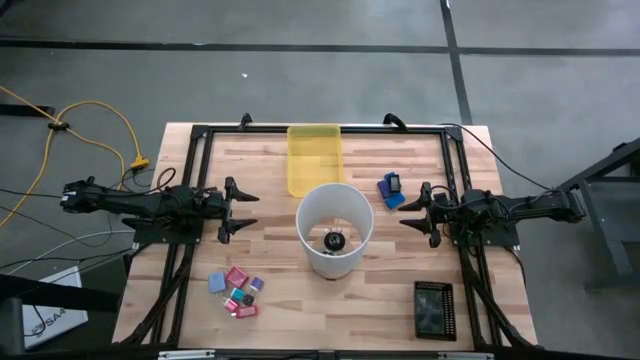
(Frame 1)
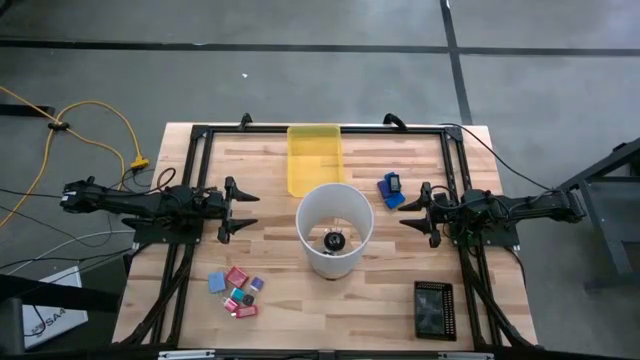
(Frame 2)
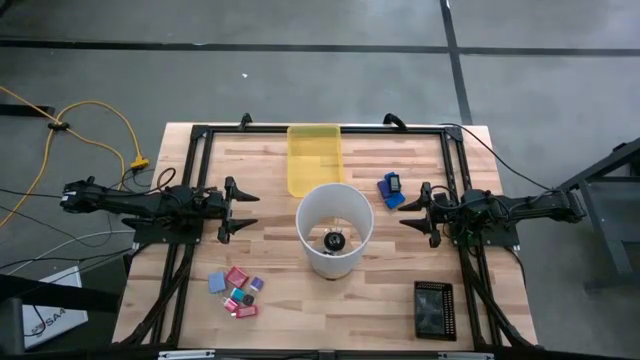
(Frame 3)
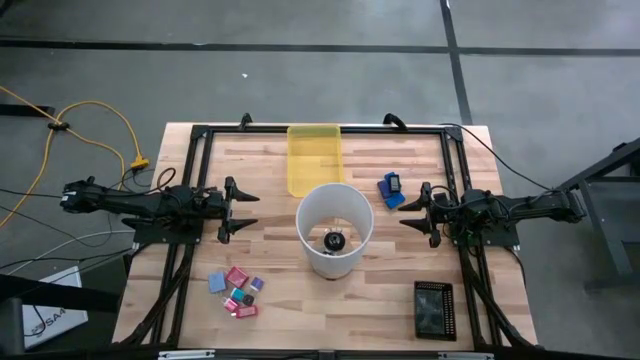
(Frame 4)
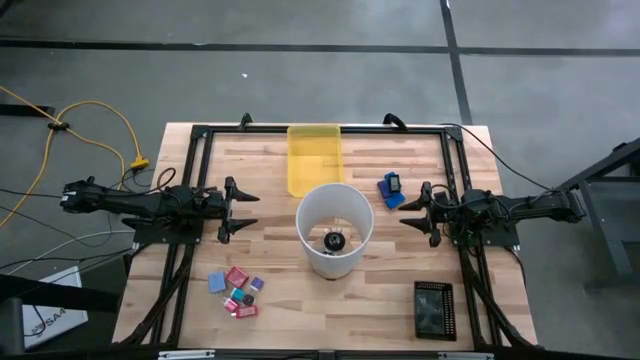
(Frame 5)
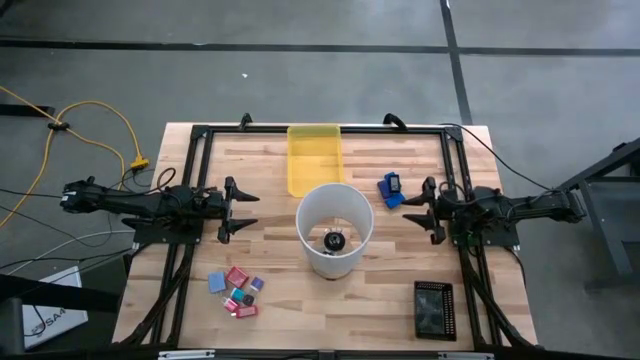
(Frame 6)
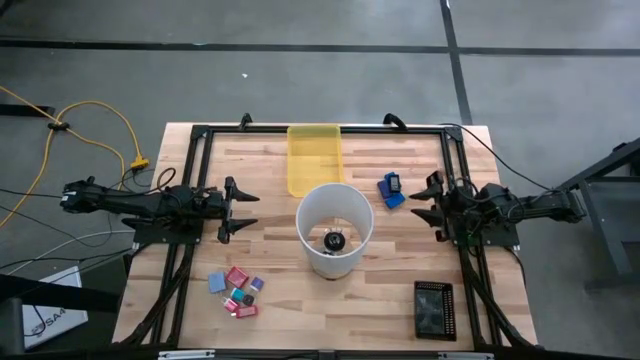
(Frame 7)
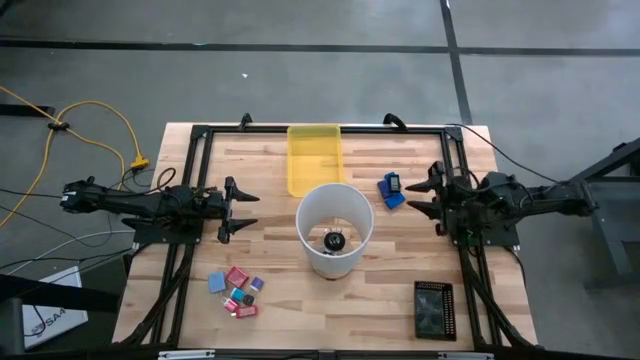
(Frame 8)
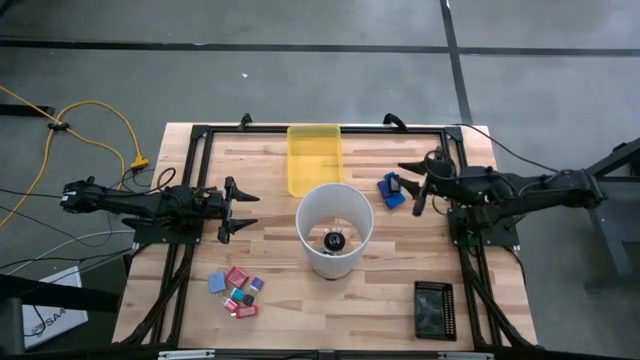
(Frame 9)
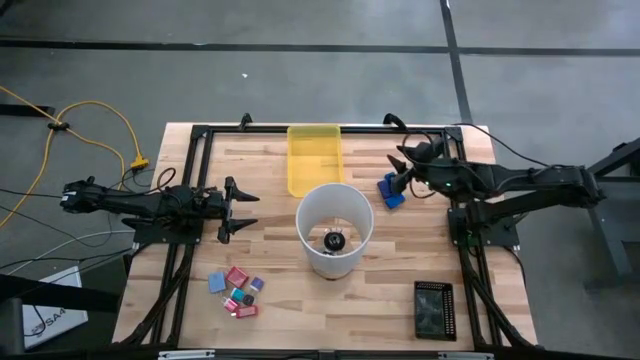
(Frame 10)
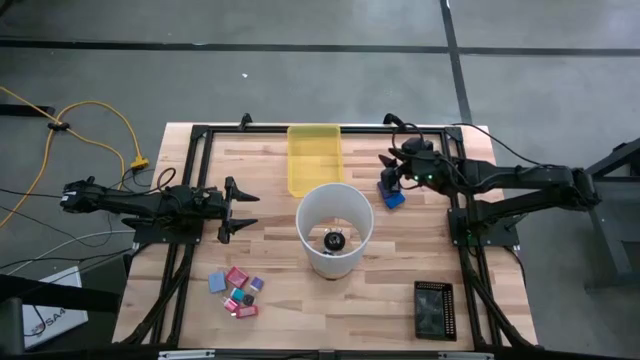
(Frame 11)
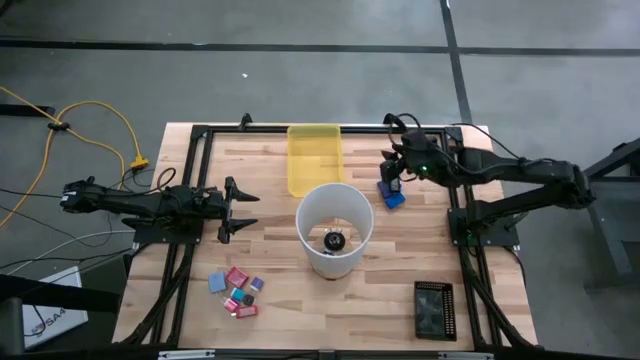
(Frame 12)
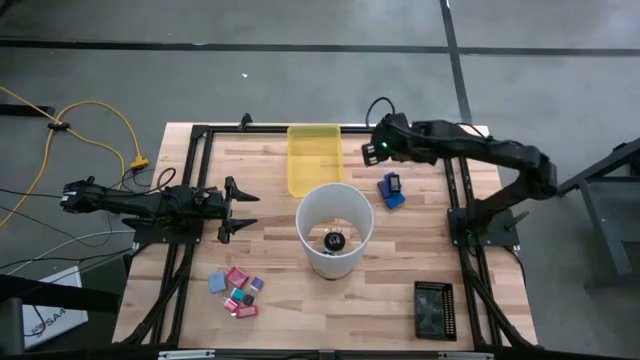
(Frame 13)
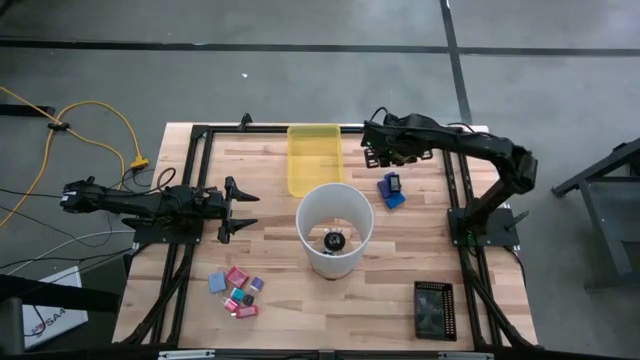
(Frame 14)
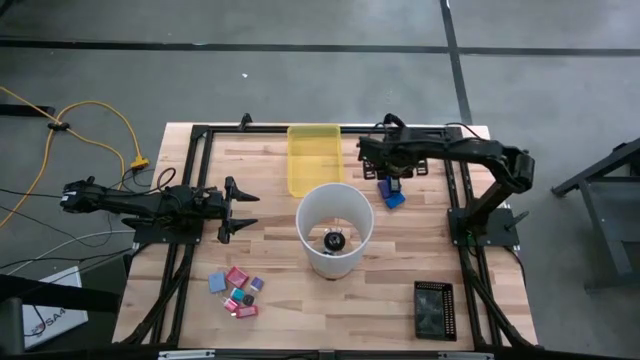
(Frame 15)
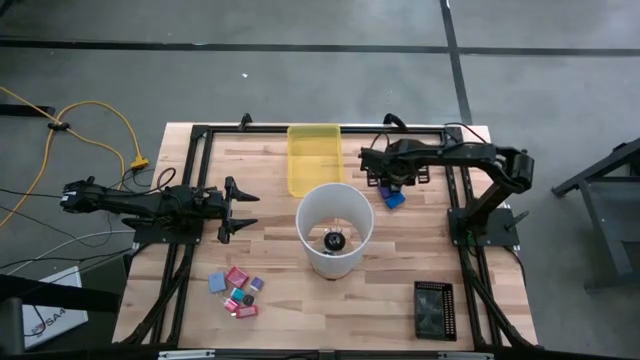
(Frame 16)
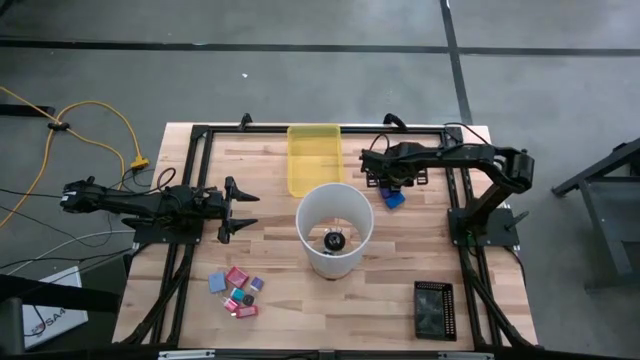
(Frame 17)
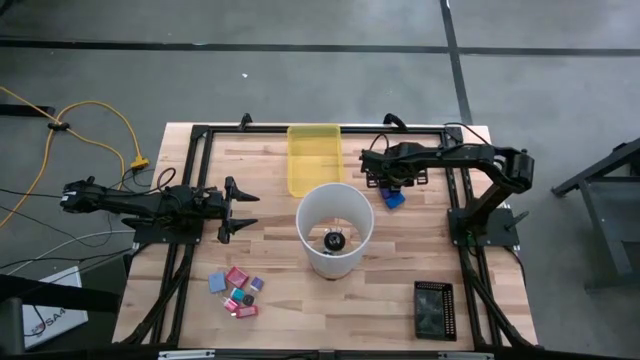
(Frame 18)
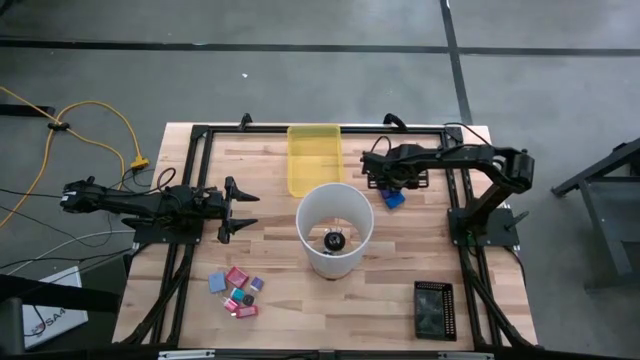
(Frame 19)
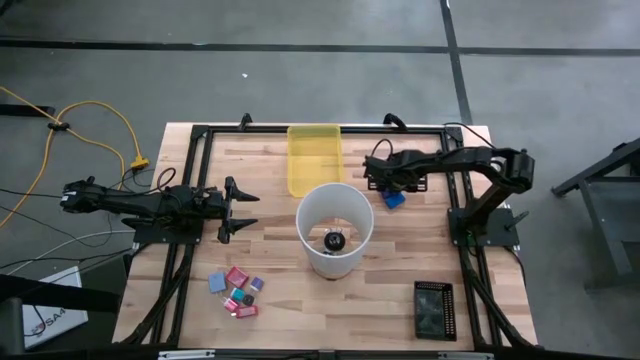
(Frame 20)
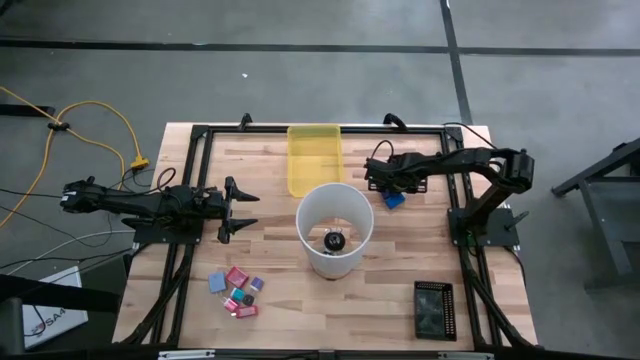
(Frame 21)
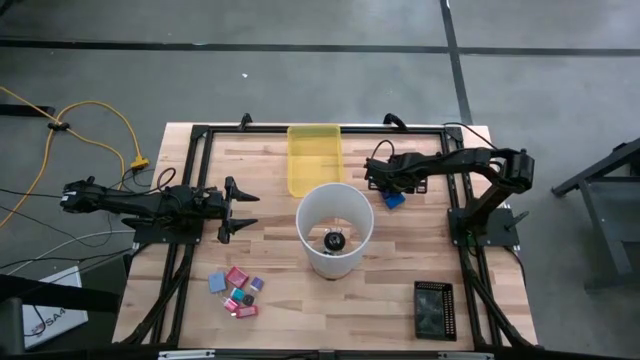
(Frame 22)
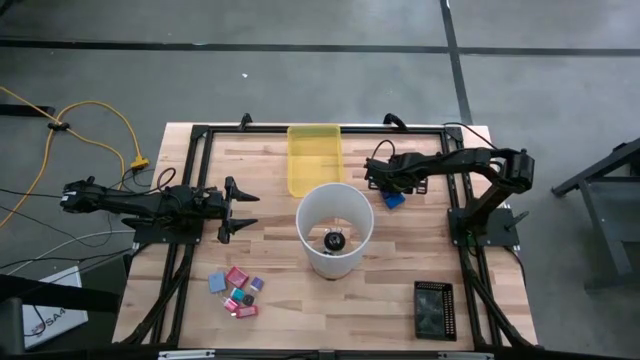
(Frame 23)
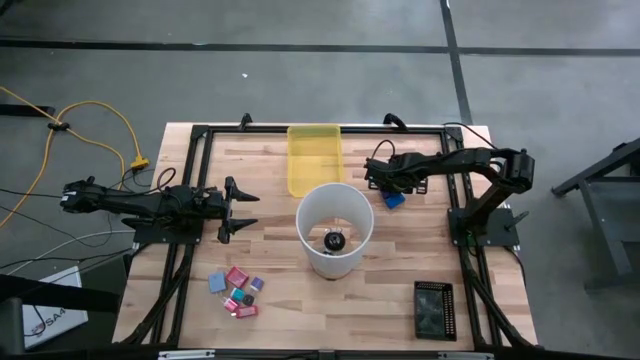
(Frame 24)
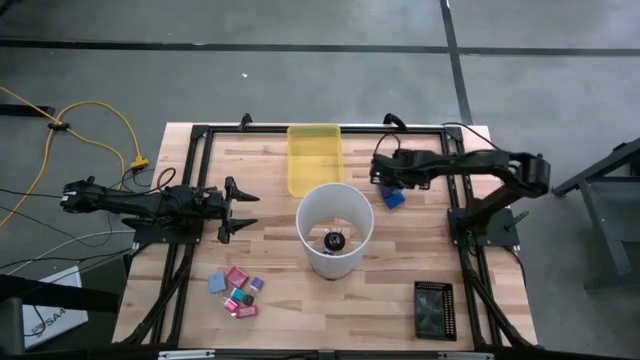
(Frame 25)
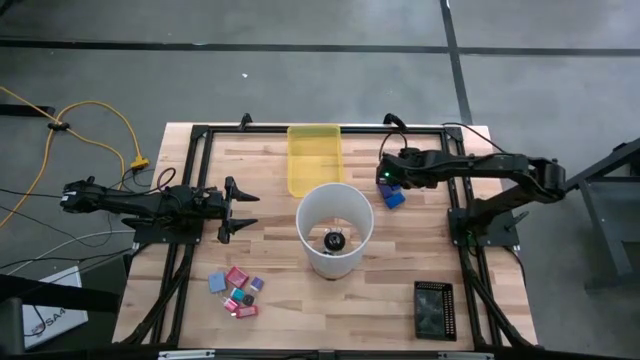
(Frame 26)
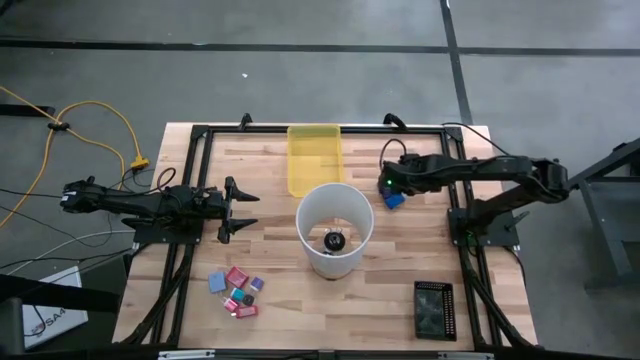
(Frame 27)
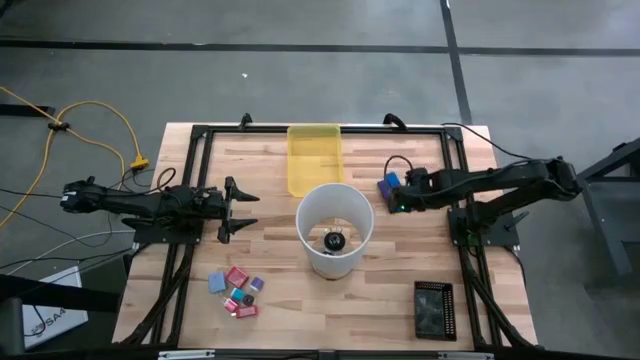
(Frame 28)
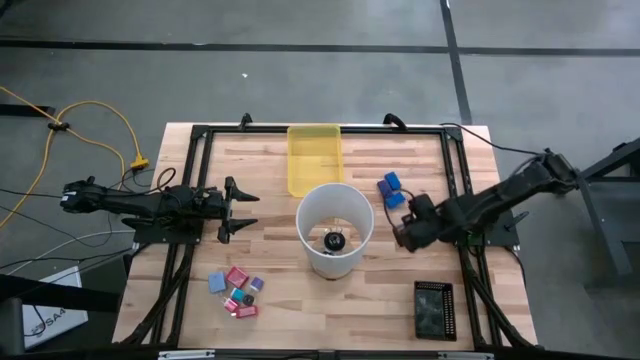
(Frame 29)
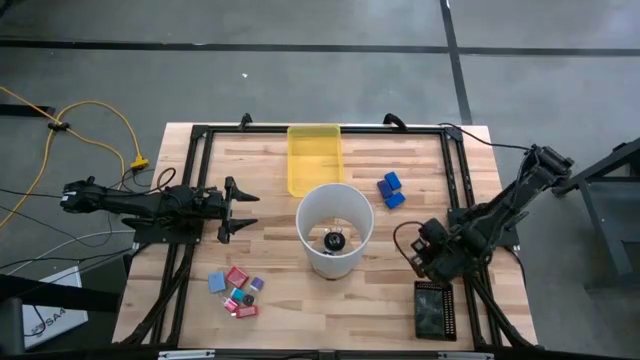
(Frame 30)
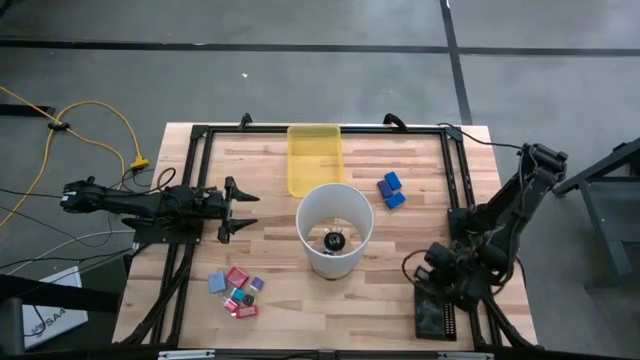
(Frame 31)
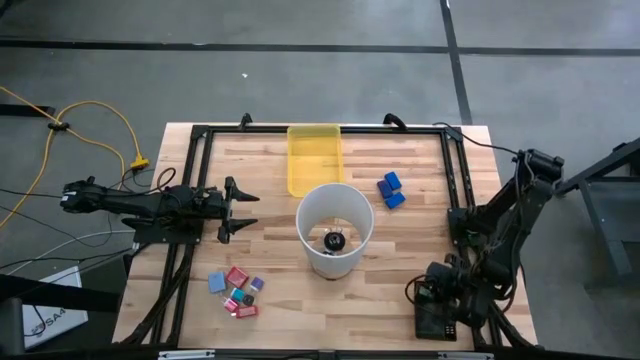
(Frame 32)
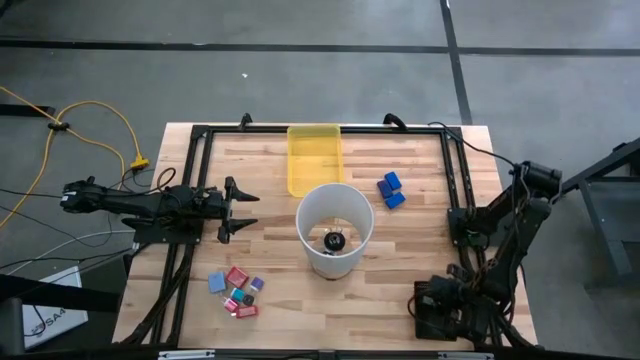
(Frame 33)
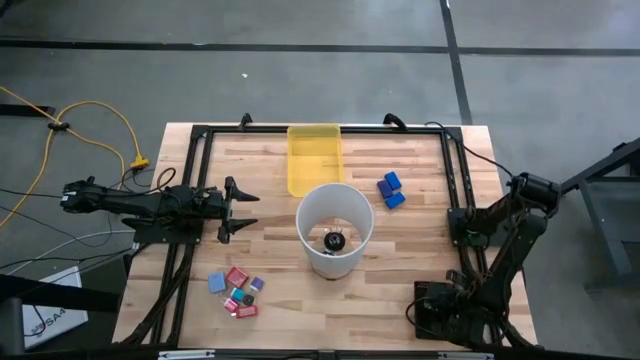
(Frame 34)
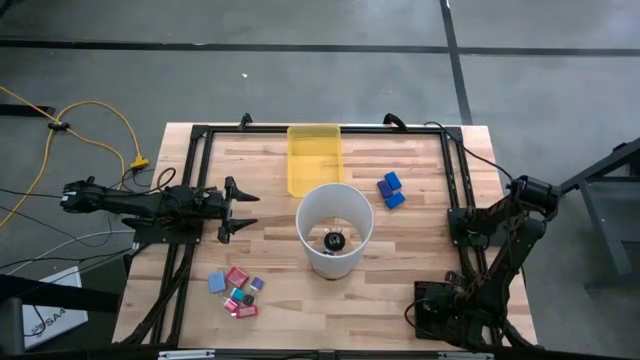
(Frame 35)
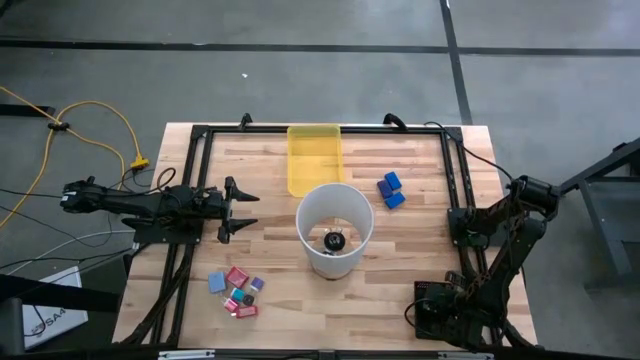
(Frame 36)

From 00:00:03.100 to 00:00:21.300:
Task: Pick & Place Office items
Put the black timer into the black bin
